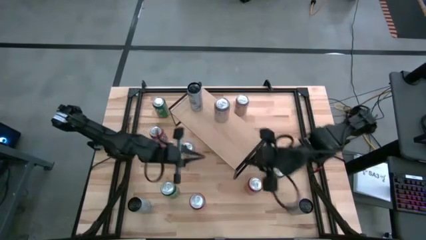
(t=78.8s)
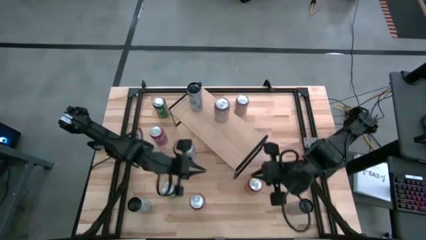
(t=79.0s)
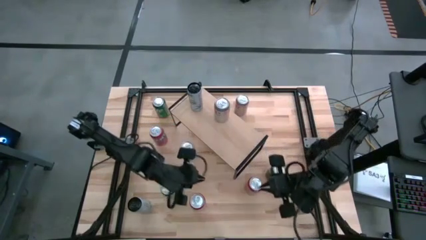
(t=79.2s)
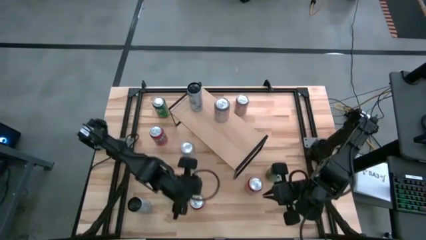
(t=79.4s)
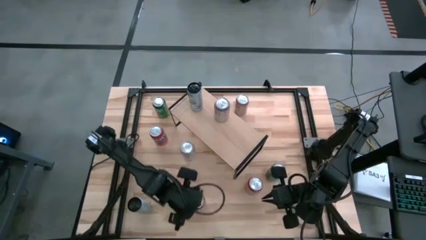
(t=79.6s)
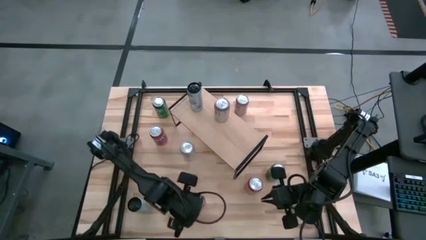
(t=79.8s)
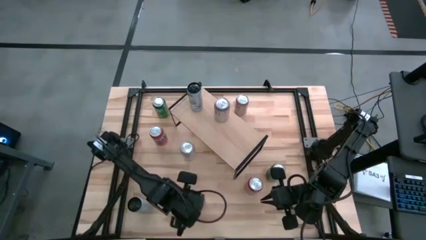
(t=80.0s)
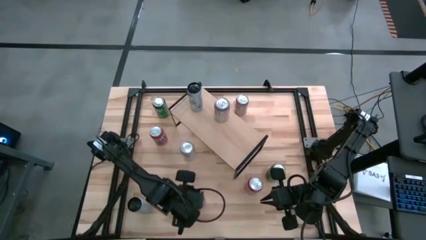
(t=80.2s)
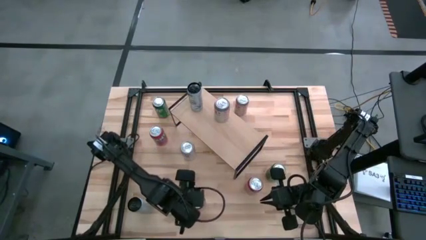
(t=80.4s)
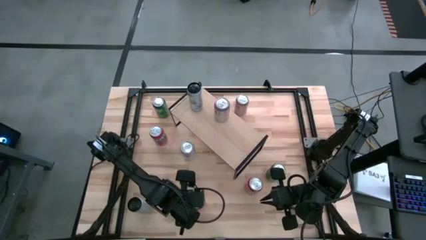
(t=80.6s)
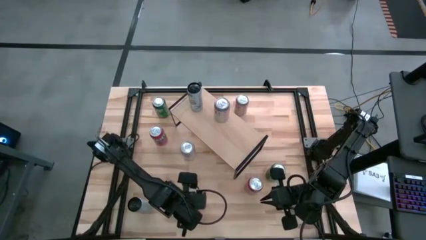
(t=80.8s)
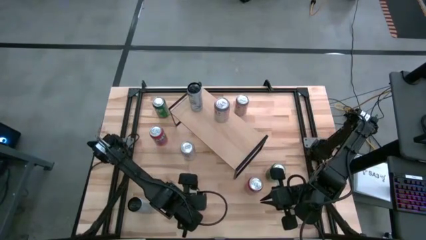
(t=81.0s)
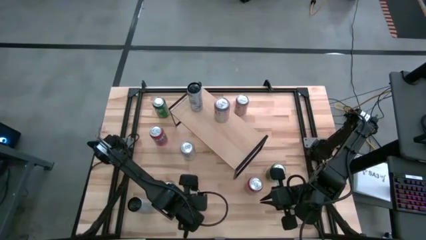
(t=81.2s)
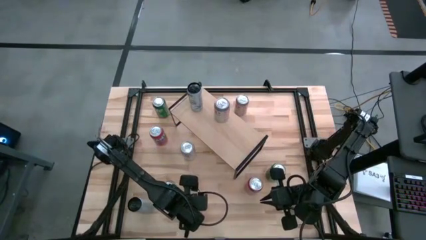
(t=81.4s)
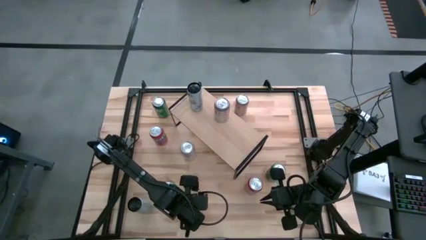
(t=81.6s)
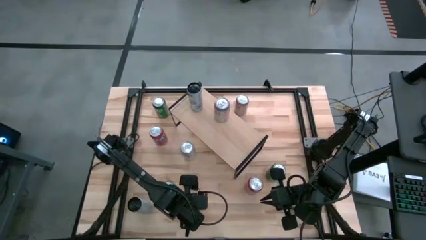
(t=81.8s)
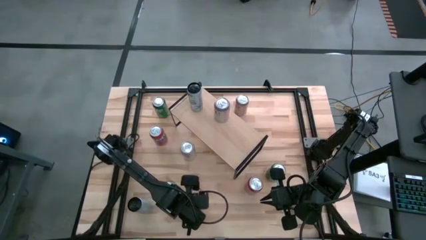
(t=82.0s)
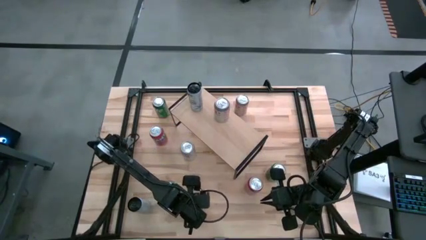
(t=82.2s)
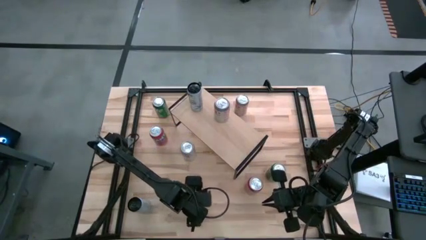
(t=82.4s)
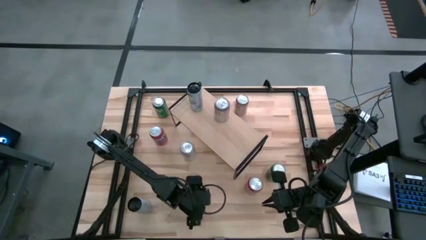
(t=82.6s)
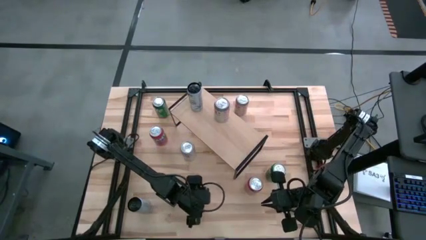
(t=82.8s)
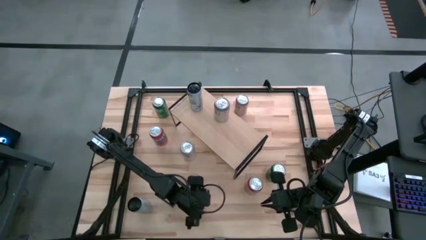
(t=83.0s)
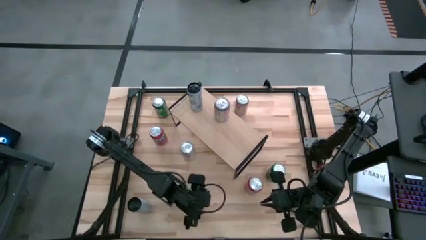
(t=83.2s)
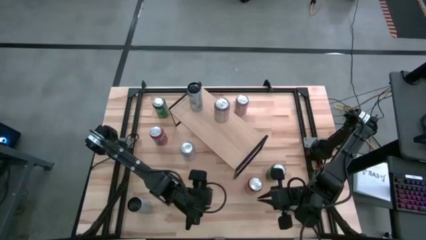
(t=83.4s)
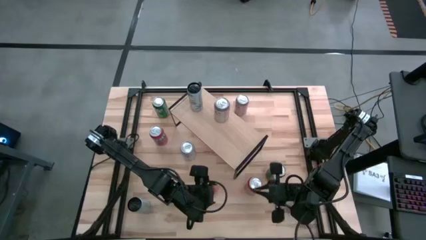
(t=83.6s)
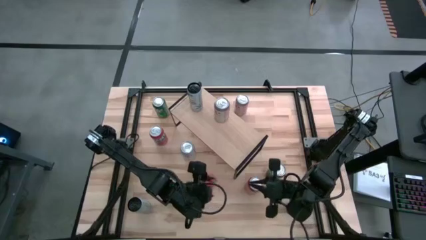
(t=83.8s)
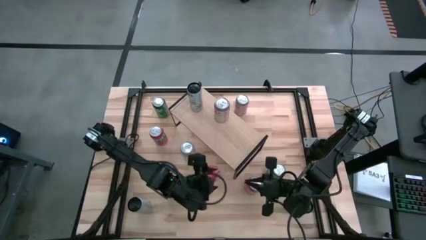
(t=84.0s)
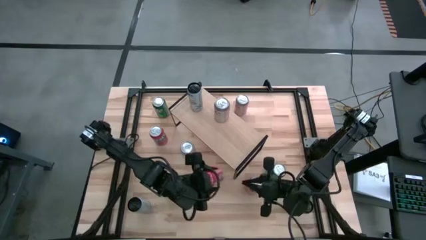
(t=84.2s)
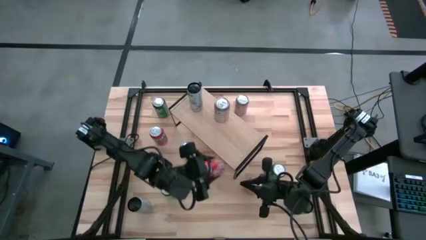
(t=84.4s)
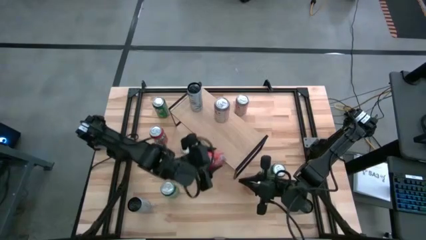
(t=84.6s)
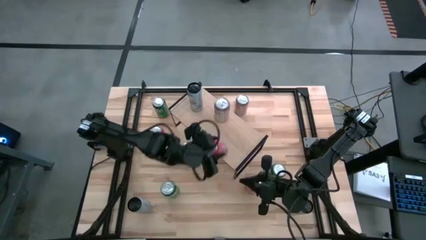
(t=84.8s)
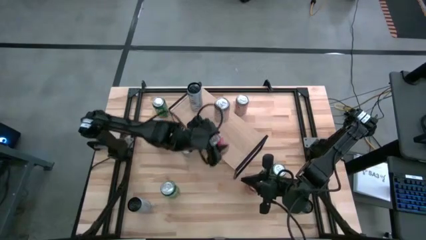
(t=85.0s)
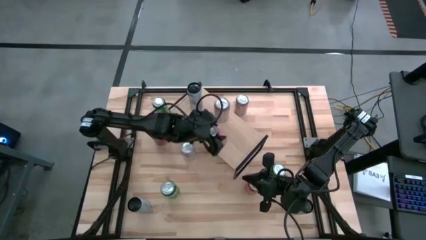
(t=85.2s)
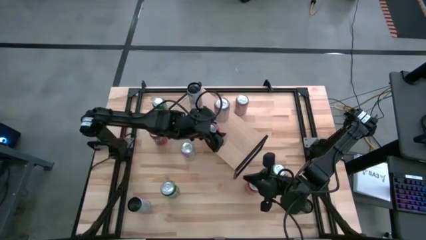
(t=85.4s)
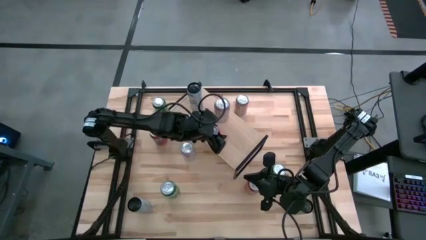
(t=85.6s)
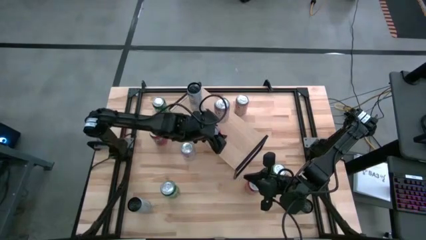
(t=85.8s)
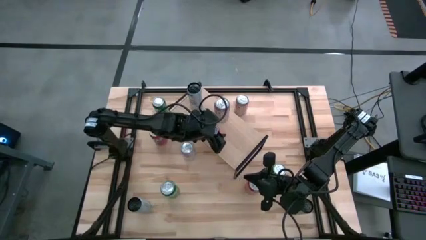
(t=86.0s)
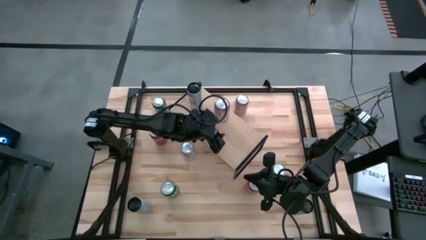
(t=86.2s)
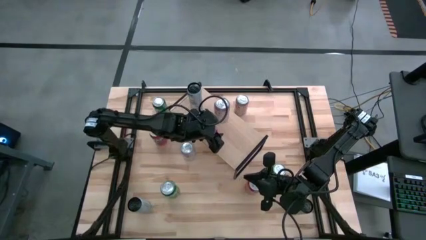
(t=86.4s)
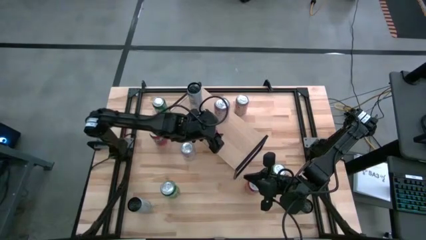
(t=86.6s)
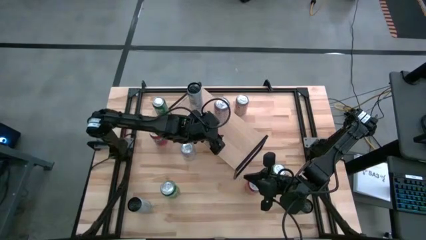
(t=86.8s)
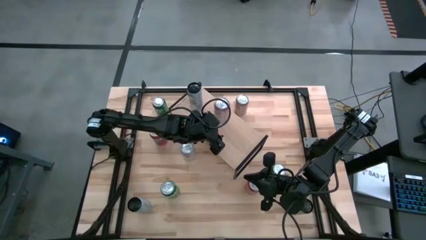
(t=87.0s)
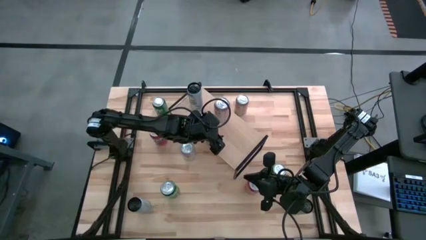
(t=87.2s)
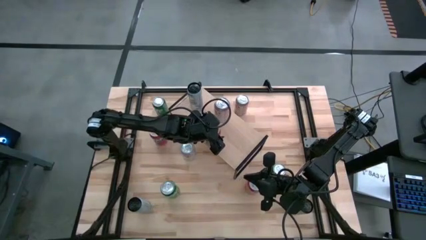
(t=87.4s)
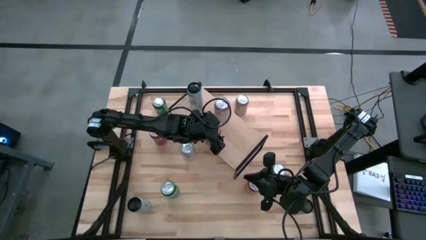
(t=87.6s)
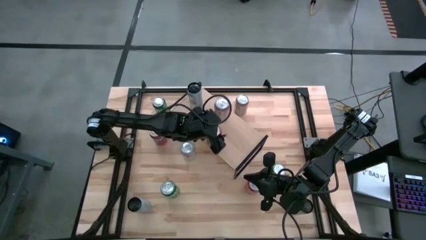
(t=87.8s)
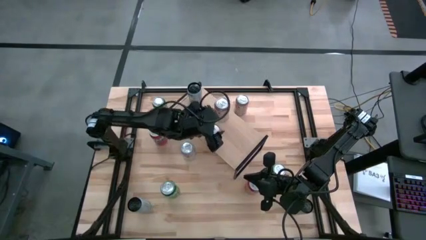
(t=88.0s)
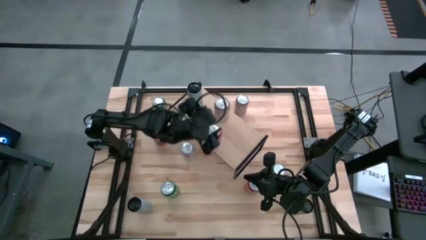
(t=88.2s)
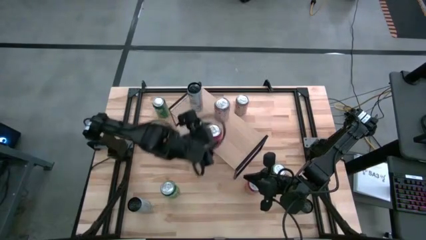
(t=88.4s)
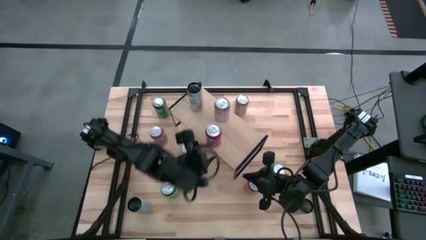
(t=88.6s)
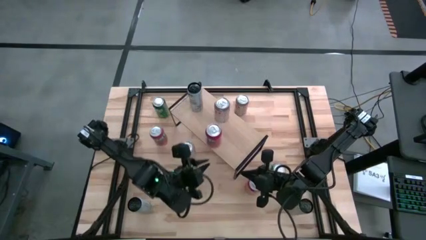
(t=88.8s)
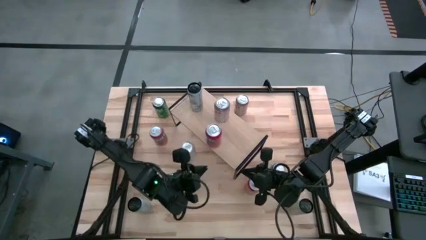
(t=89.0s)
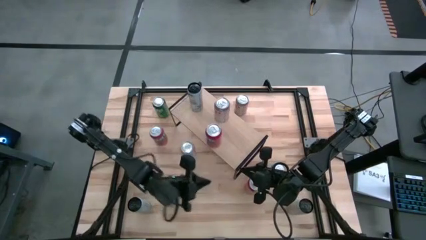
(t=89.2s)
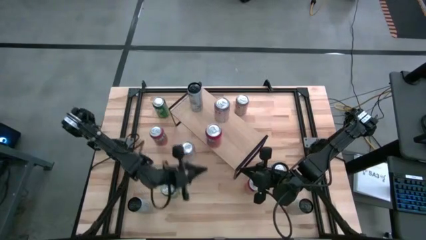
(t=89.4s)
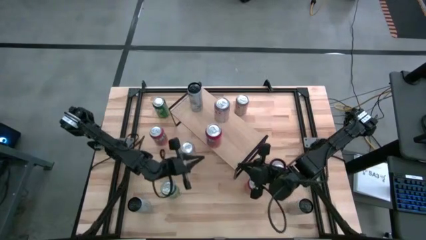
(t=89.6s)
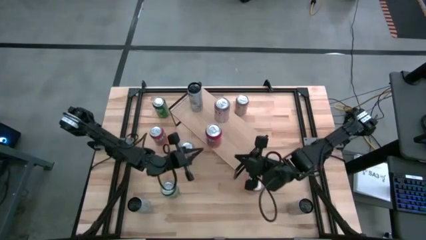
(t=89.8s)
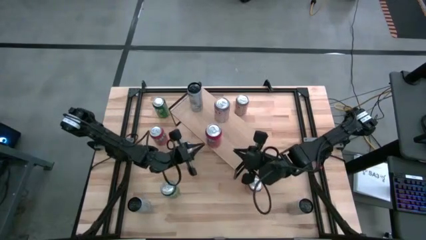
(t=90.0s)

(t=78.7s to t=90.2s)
Task: Place canned beverage on shelf
Put the bottom orange soda can on the shelf

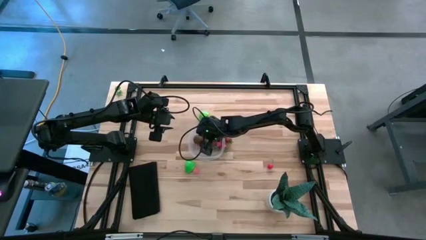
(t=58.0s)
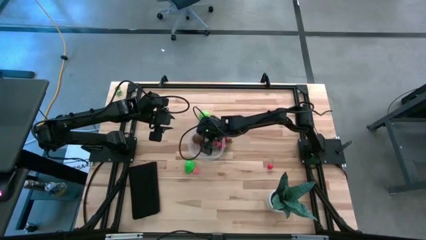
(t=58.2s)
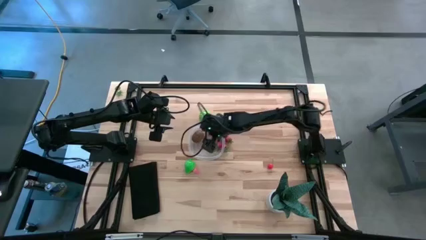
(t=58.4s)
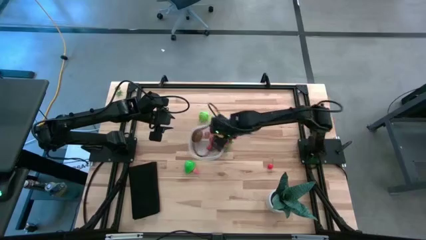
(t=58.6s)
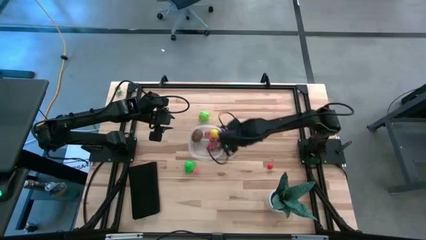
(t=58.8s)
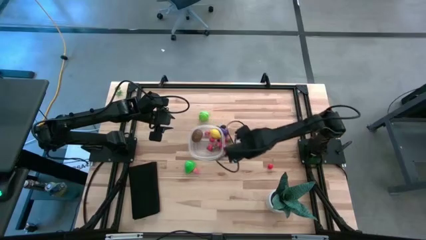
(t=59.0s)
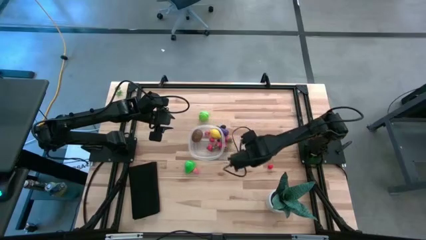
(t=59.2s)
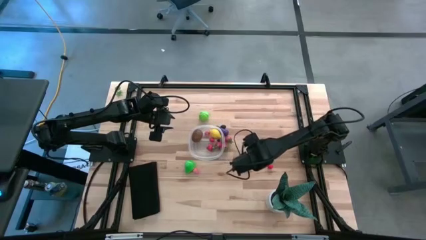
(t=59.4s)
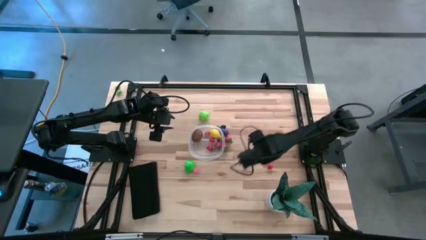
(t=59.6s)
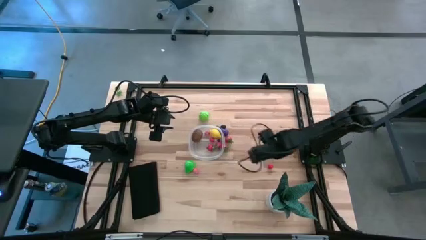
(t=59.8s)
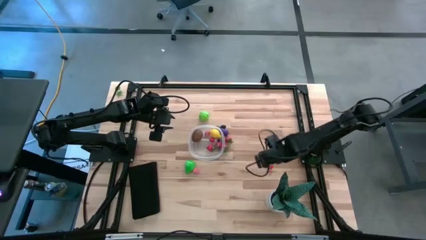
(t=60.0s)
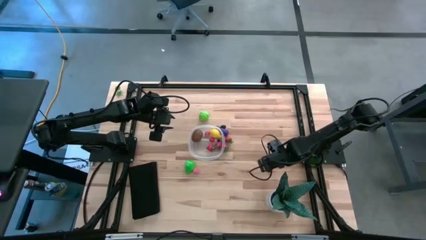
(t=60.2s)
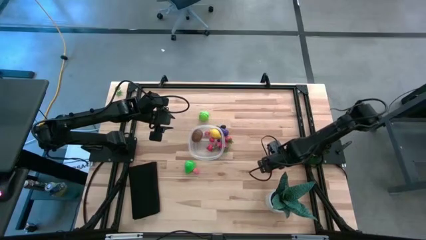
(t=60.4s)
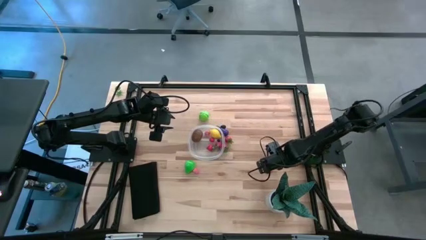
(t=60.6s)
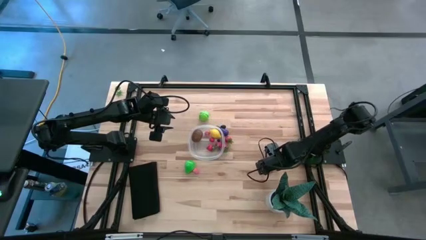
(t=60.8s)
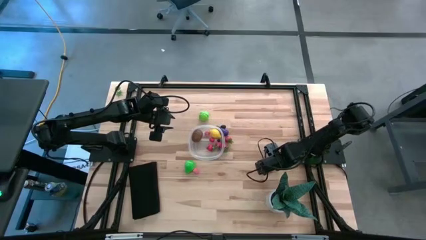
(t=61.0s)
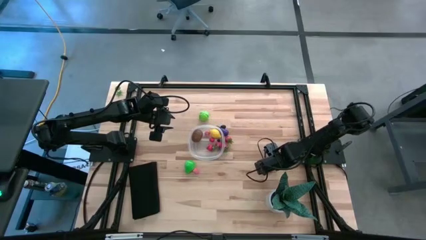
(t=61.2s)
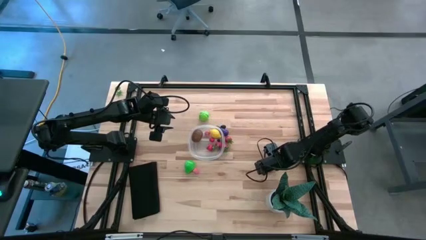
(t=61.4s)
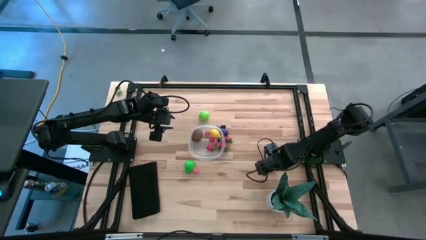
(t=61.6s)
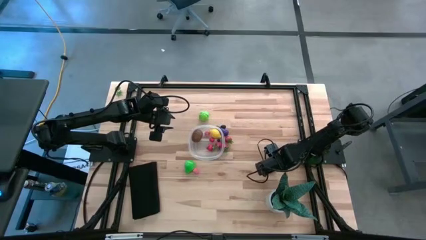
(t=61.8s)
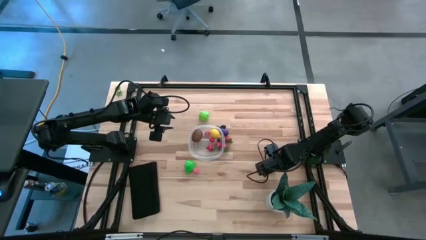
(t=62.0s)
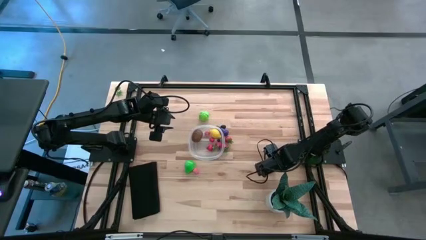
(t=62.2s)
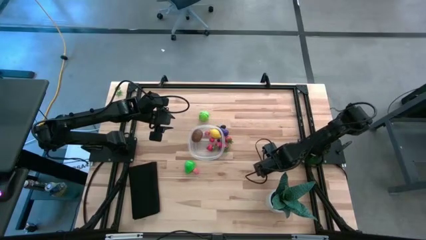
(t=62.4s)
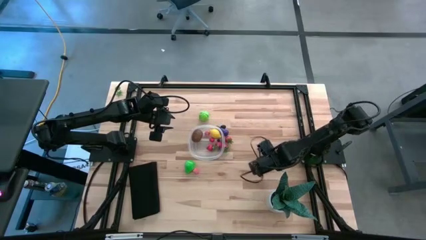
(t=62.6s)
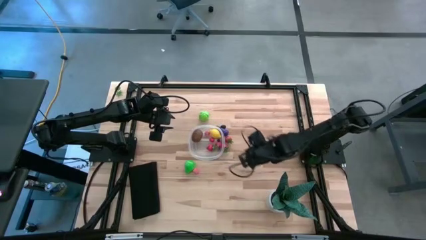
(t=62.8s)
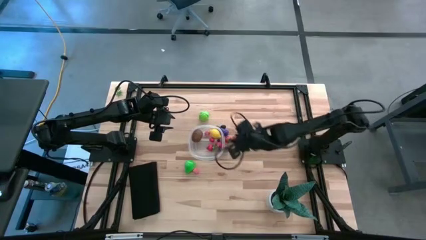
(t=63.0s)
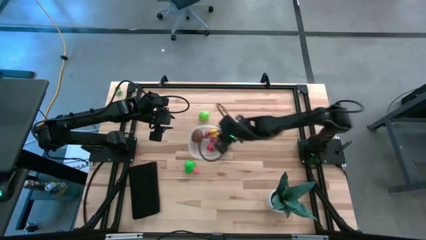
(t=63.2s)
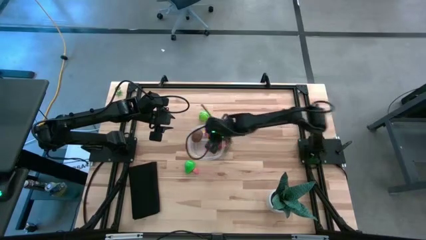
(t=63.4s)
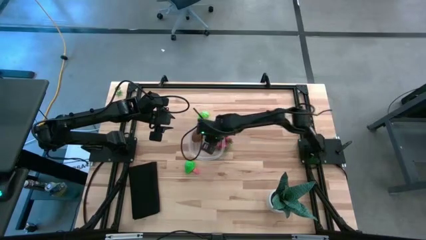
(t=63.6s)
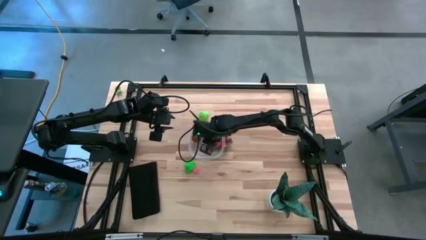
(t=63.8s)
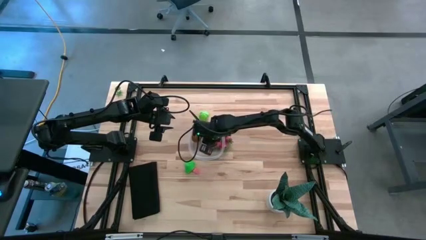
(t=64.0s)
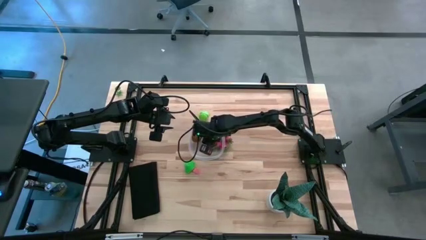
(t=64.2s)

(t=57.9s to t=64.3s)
Task: Pick and placing Produce into tupperware
Put the right cherry into the transparent bin
